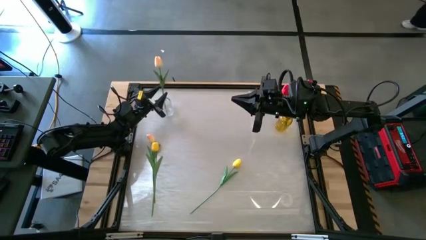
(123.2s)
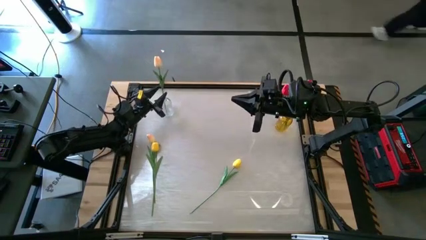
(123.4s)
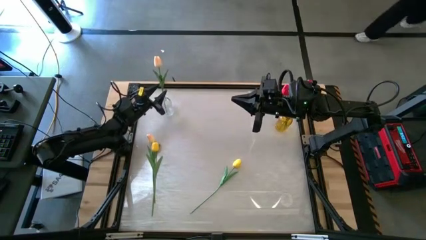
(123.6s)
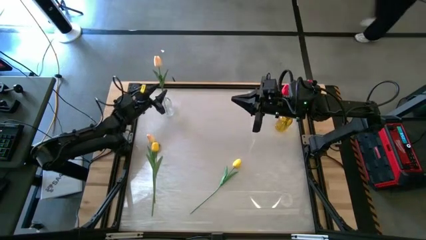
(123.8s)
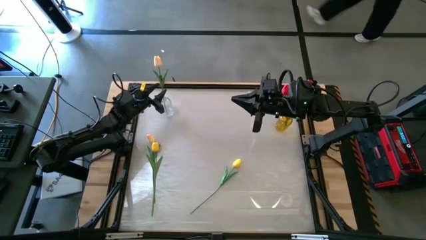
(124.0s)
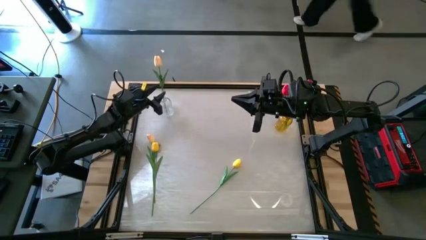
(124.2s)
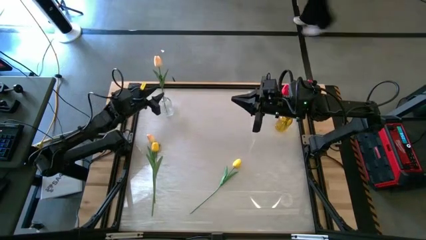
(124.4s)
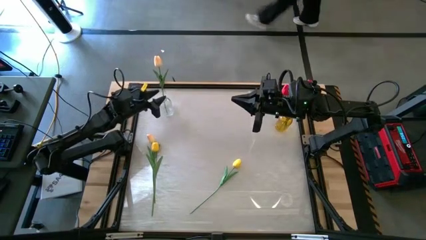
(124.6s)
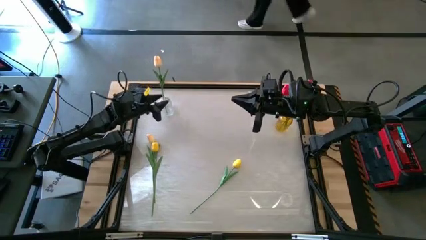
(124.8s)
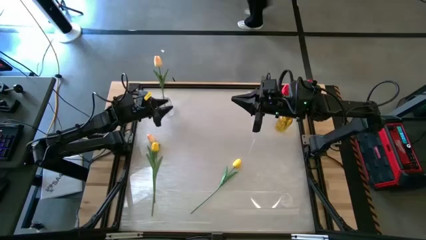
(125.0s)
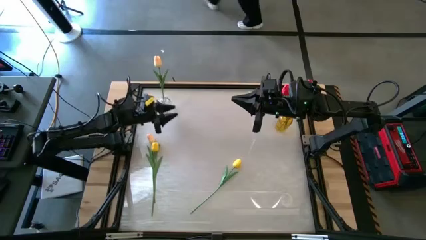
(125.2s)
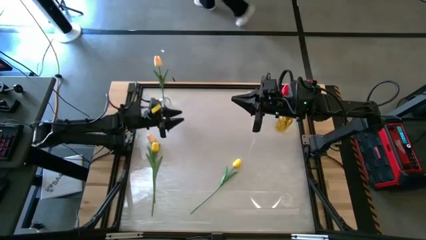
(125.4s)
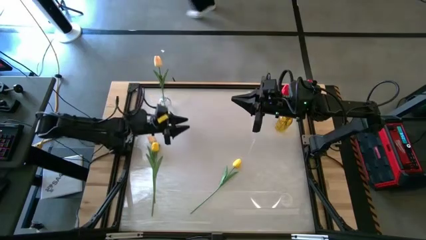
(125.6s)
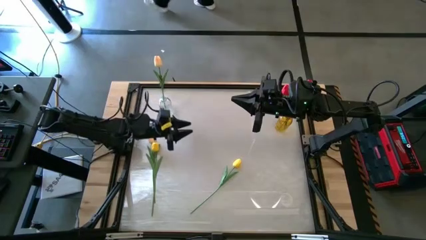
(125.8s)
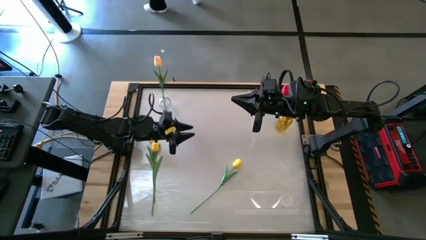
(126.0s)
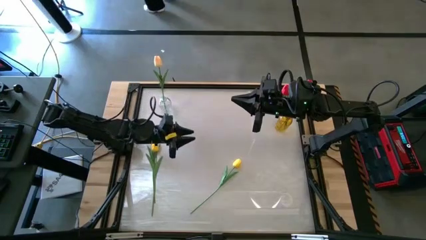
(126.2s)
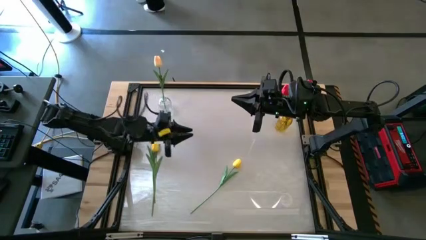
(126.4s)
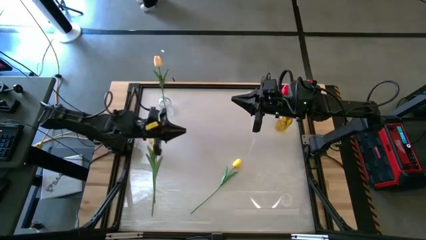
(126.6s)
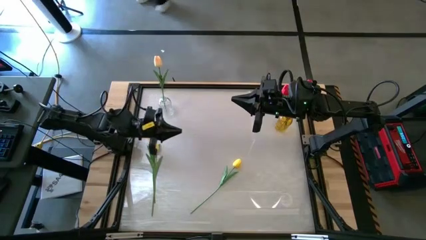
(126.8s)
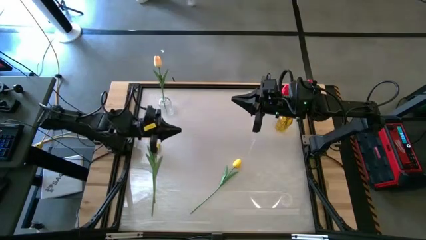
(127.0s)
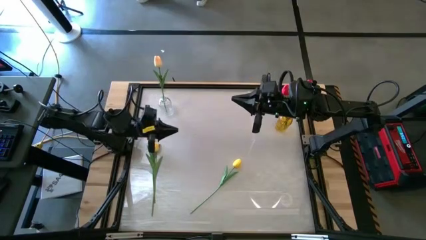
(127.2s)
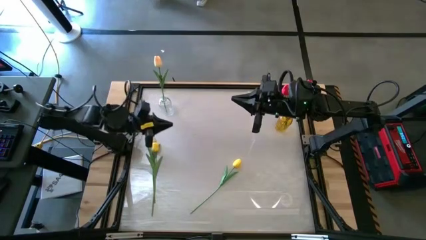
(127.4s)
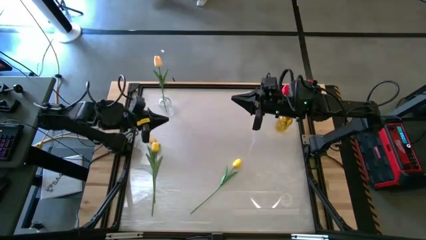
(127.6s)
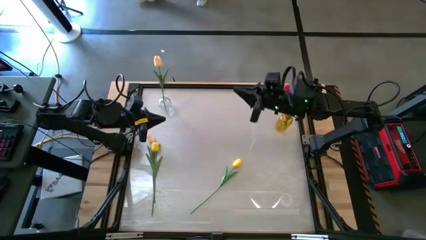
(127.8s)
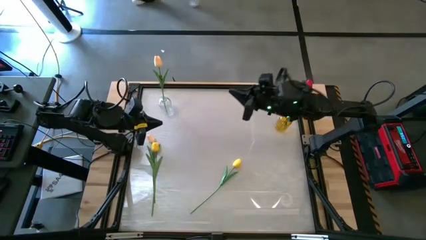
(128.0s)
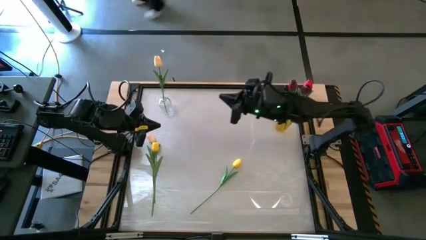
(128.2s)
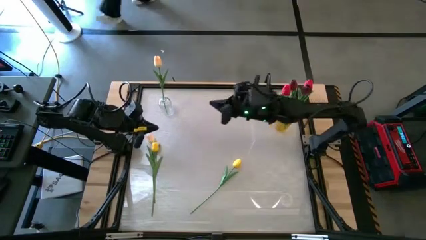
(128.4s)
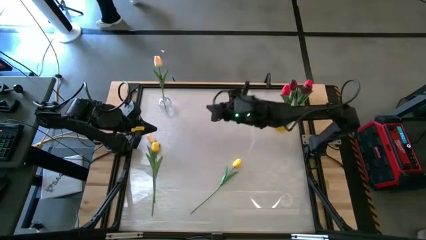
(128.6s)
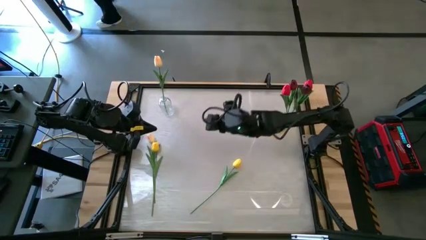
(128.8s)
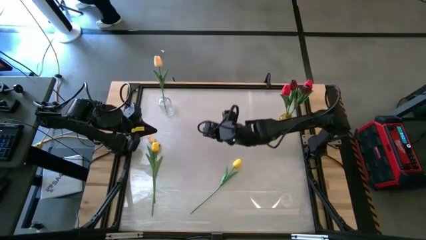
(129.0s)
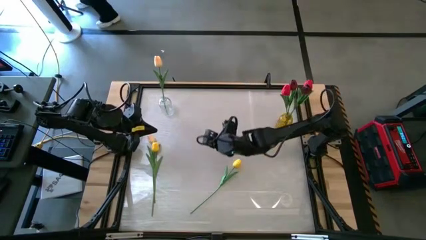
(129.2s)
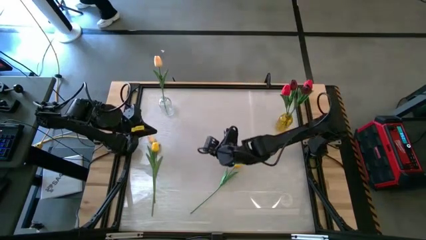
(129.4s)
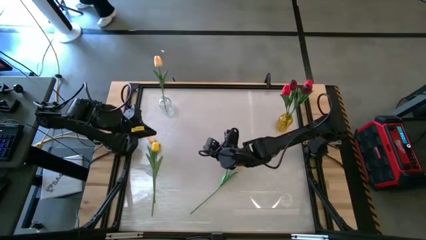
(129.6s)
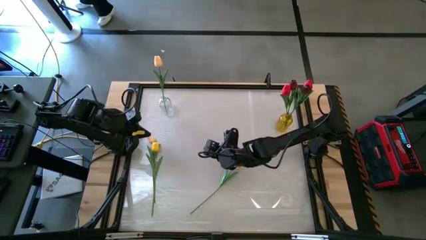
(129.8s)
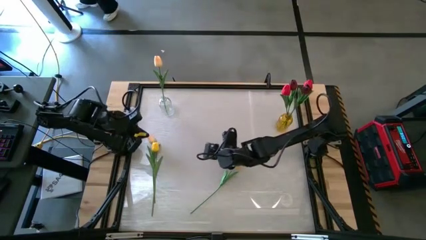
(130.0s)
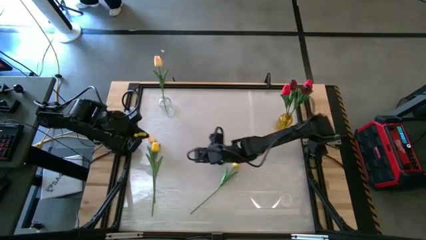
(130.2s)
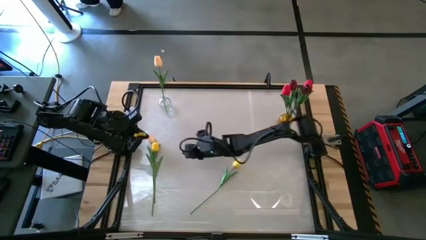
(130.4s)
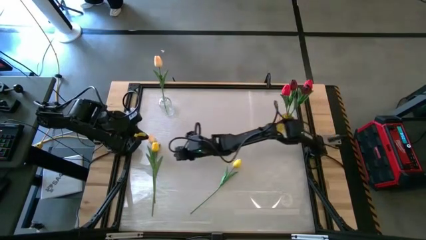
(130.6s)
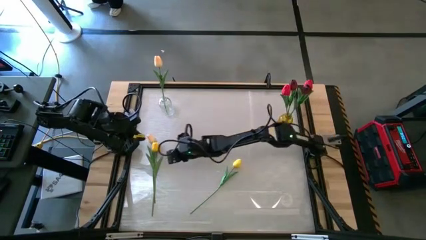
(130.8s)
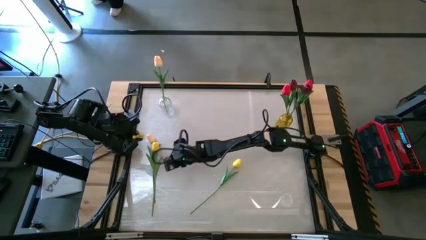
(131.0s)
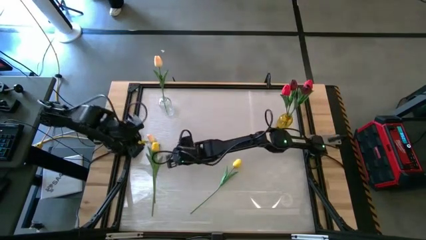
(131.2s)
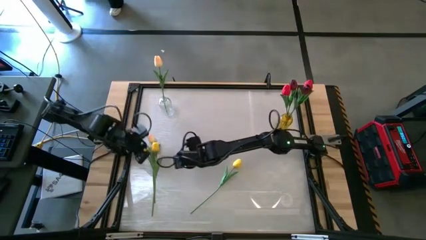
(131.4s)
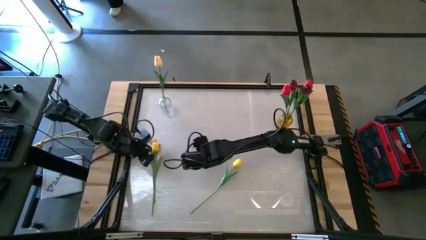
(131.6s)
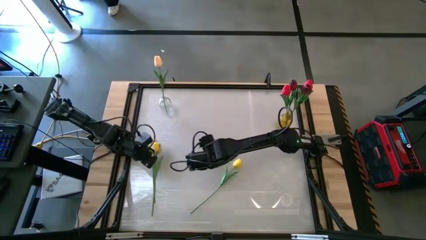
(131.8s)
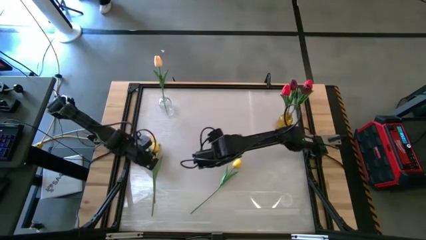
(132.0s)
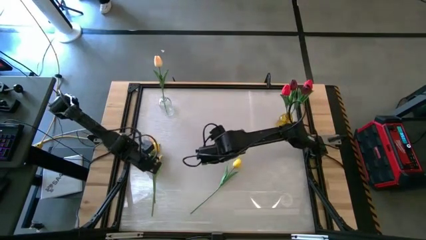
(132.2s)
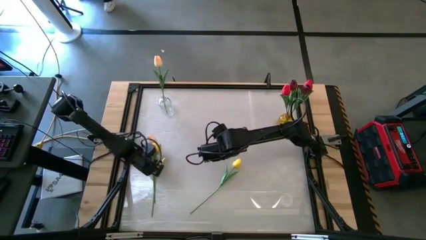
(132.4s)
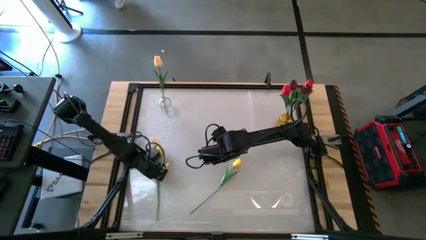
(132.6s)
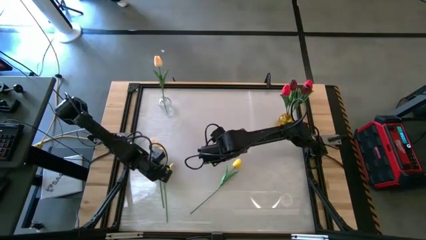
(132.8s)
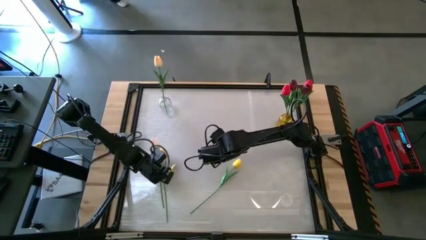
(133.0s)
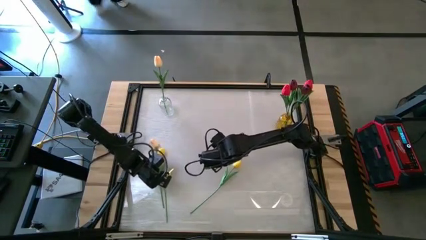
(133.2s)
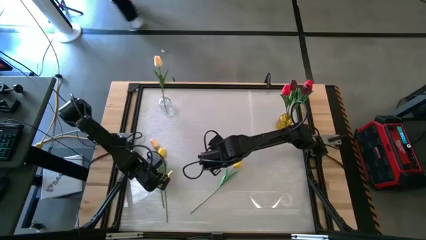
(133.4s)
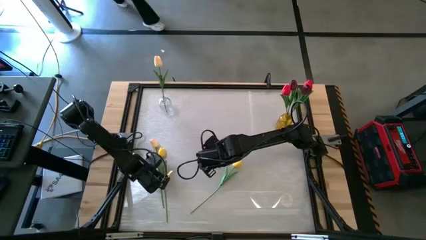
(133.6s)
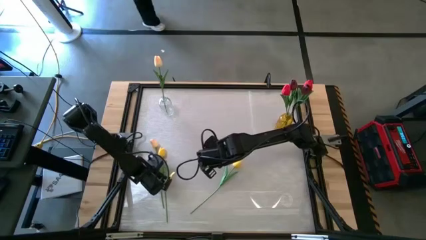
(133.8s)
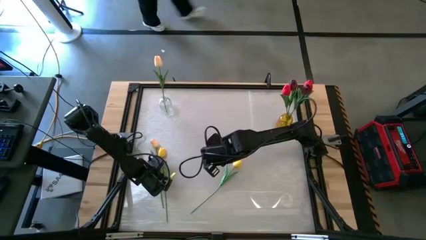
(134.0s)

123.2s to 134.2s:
Task: Sort flowers into vase by color
Put the light pink tulip into the transparent vase

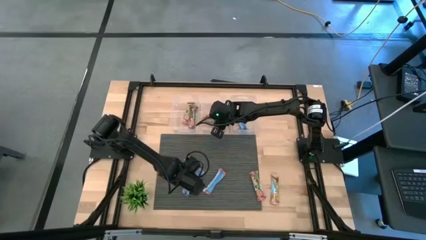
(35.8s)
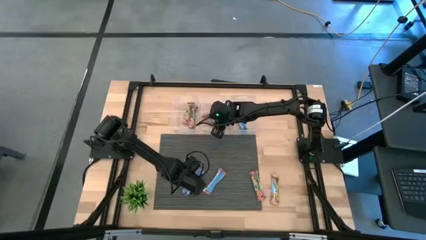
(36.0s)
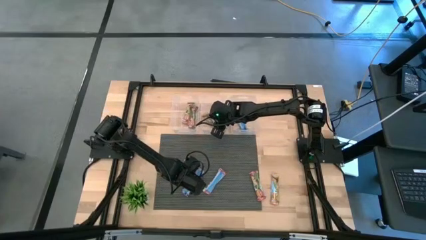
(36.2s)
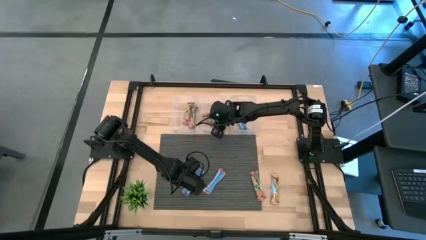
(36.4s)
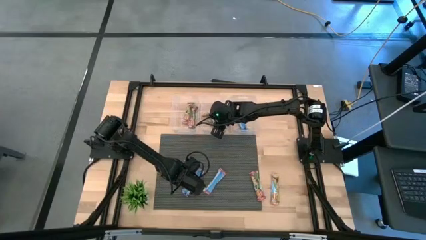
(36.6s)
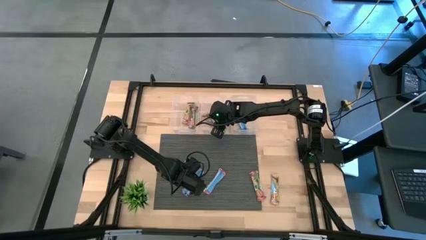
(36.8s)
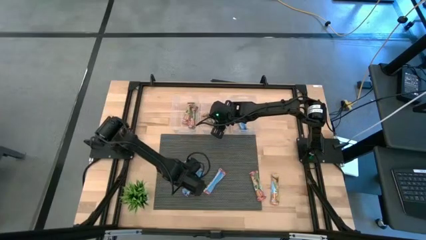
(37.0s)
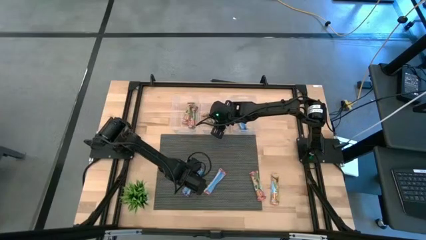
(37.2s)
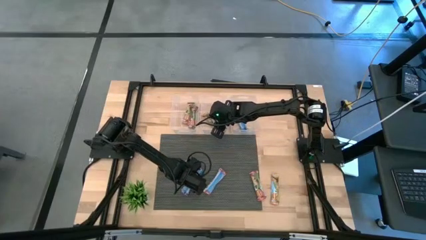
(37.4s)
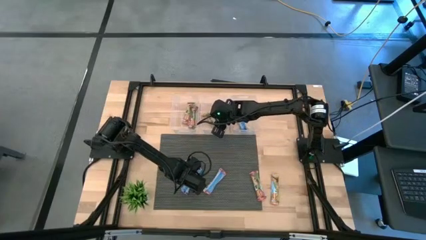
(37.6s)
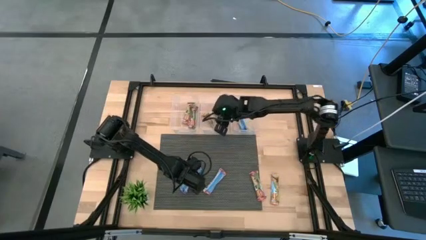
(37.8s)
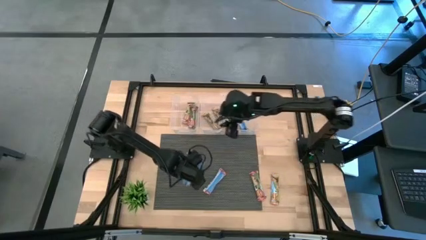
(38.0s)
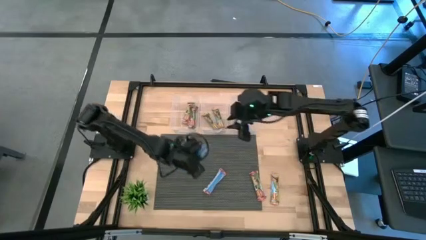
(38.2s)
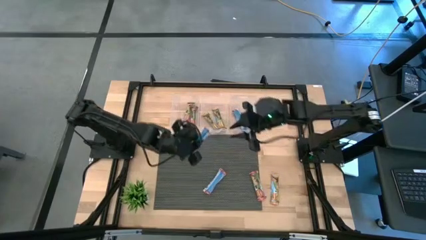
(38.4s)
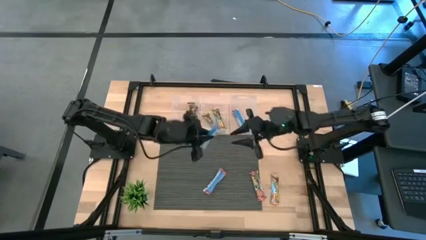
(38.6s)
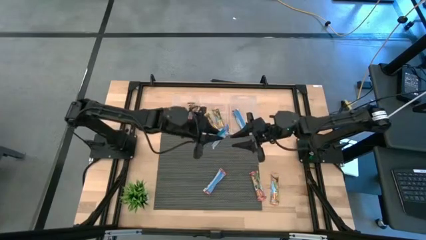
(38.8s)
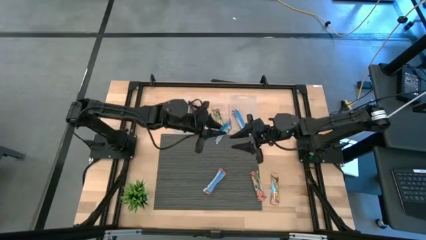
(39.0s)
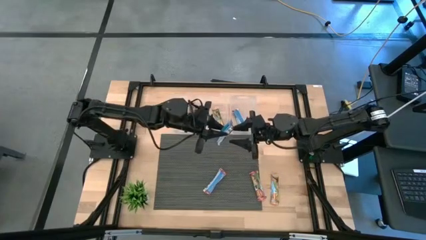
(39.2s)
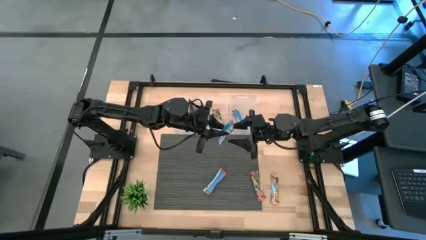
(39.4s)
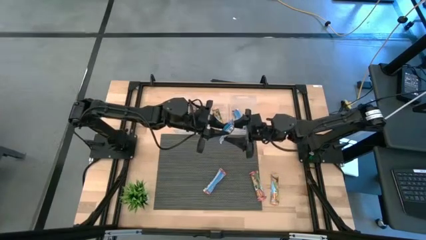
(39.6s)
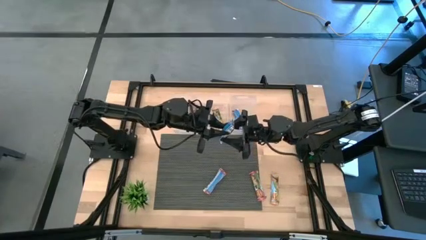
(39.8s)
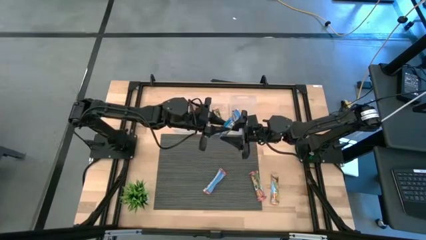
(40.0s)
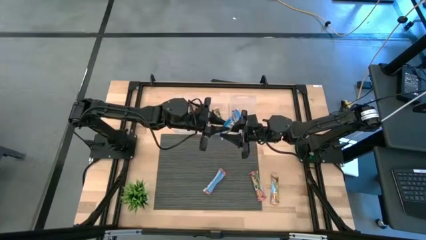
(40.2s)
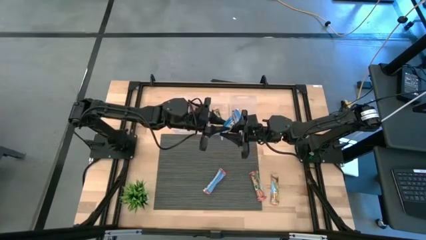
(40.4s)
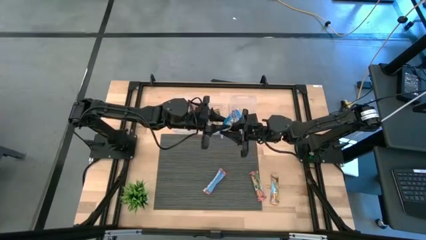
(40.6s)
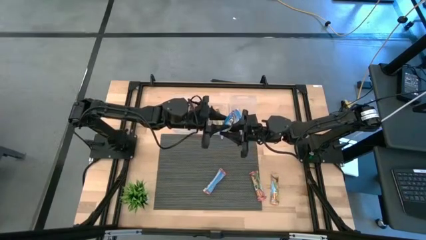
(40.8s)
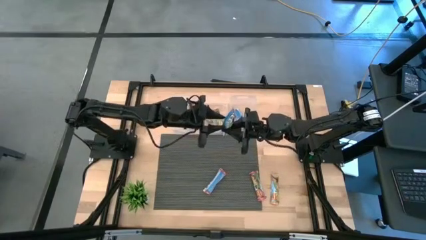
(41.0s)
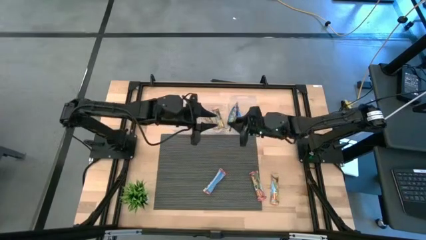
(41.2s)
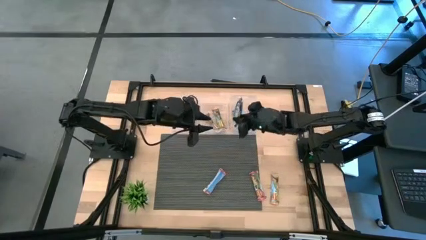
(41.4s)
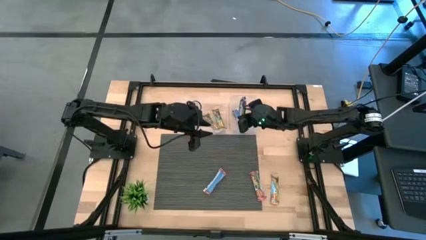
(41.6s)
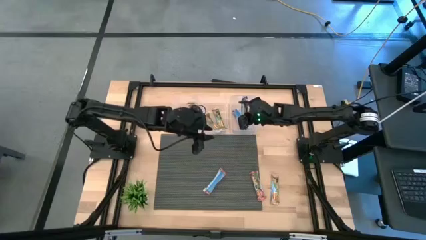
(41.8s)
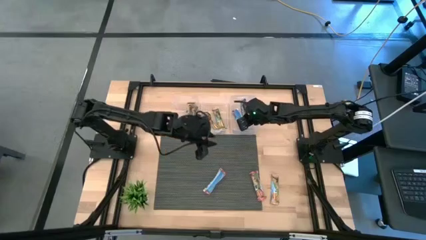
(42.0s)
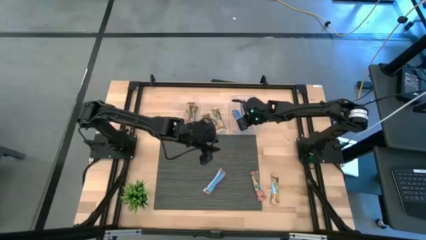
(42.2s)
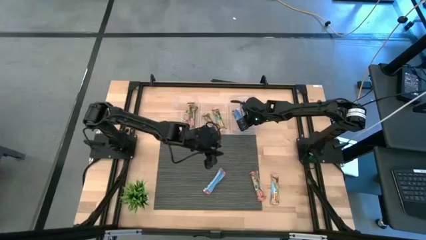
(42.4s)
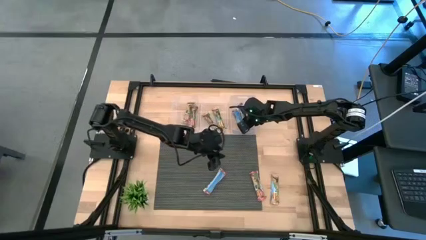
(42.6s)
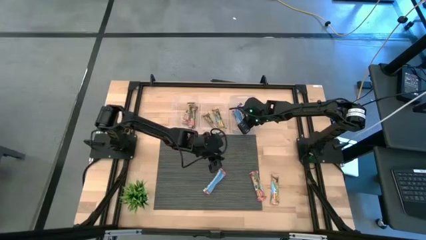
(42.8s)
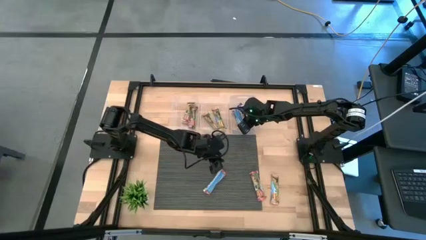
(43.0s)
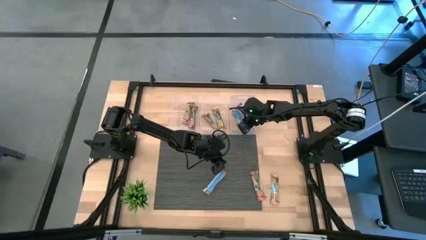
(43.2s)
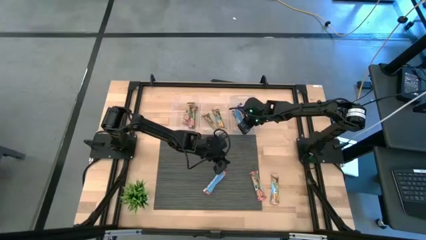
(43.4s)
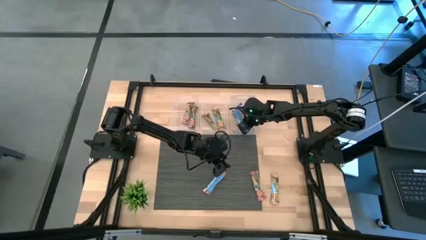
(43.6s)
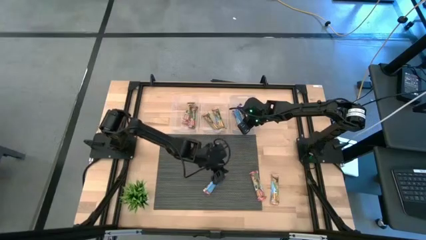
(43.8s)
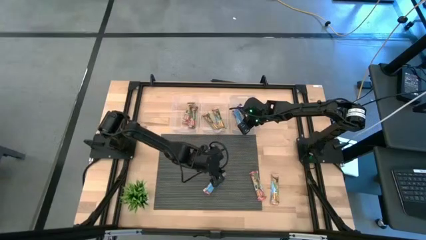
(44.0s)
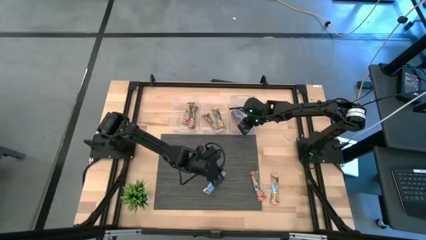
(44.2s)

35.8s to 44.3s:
Task: Pick and place Granola Bars by type
Put the blue granola bar into the right transparent bin
